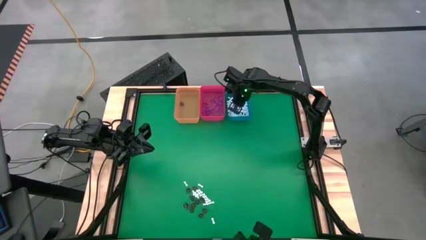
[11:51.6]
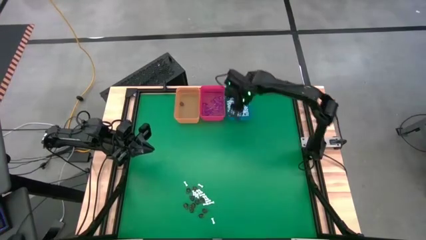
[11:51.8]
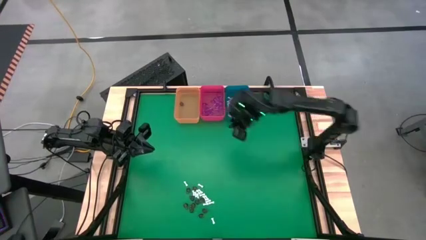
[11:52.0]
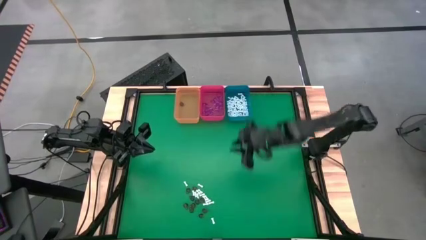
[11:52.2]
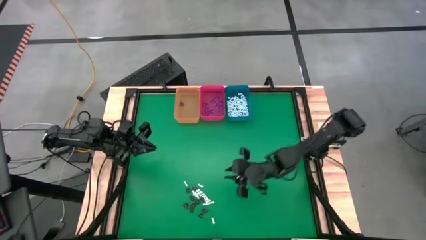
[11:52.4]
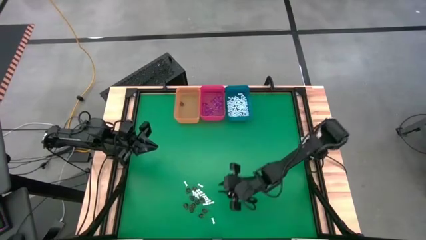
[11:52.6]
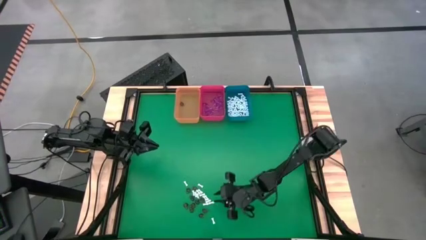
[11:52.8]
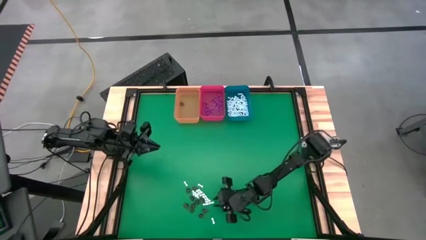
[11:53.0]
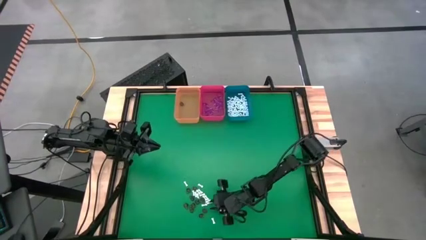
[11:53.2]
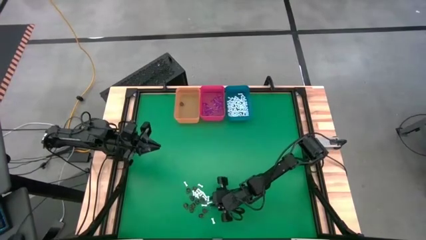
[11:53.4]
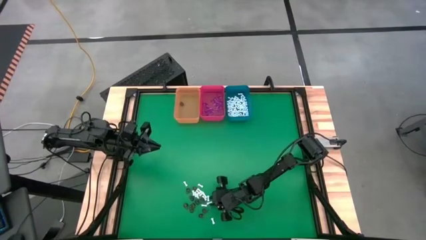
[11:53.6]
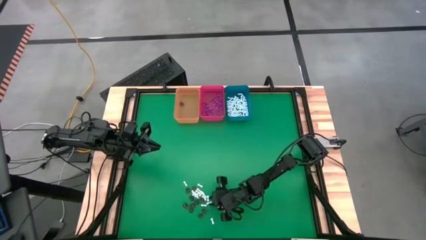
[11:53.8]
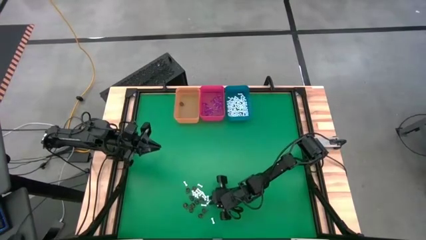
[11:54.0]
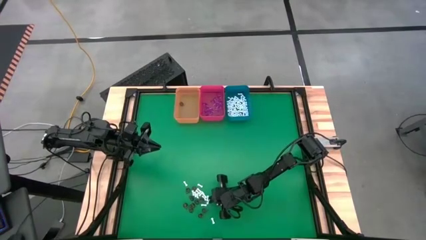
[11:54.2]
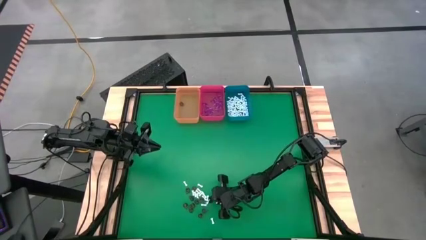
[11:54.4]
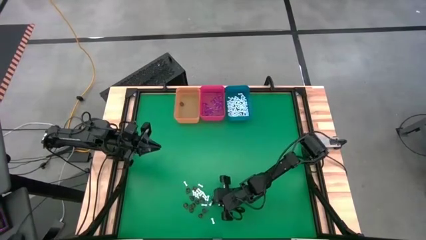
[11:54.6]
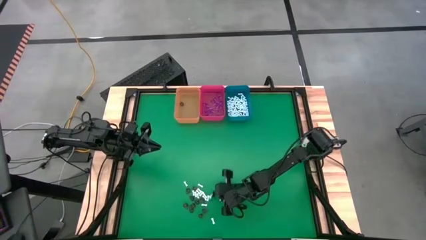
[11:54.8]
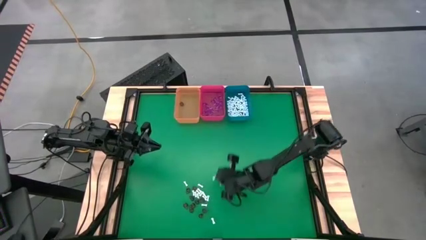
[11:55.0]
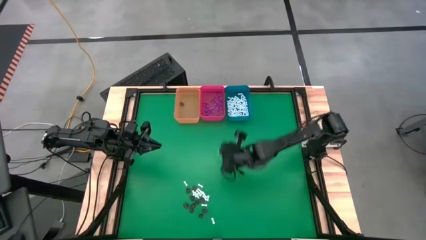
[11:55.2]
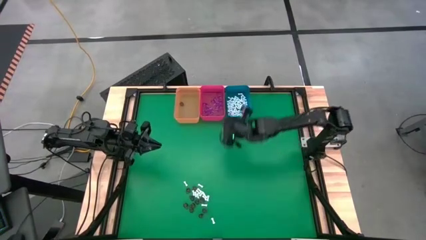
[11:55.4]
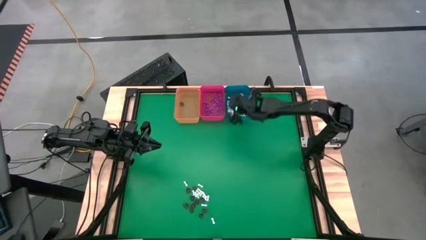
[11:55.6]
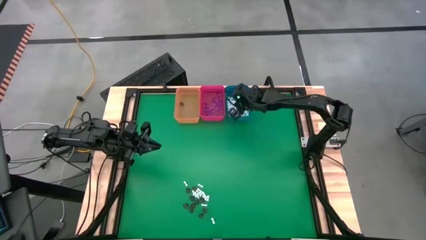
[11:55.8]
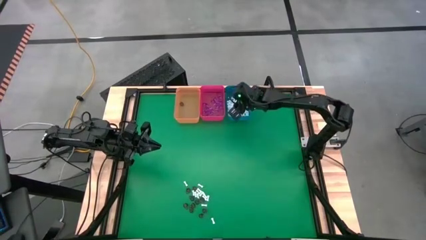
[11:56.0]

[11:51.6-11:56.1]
Task: Sort Halloween decoration
Put the white bone toy into the blue bin

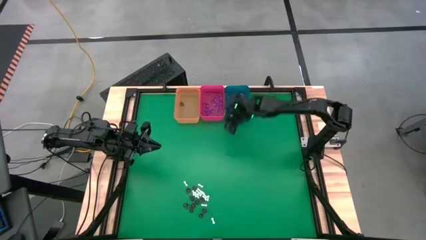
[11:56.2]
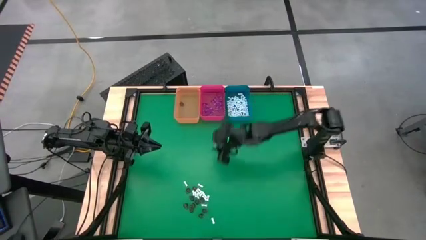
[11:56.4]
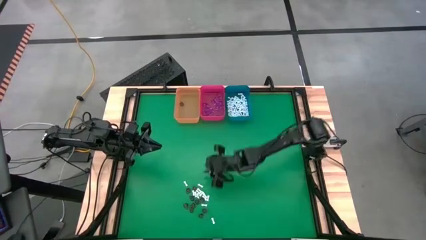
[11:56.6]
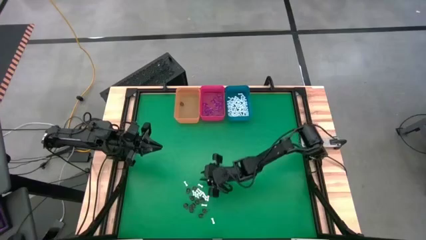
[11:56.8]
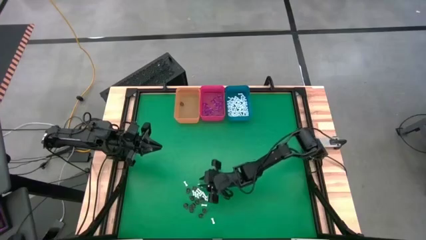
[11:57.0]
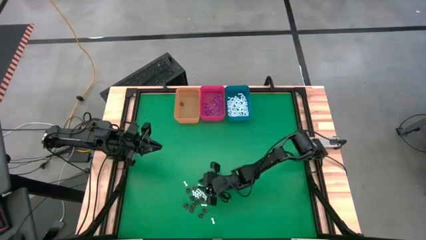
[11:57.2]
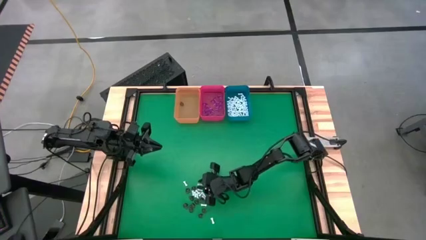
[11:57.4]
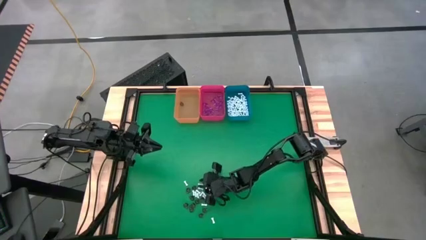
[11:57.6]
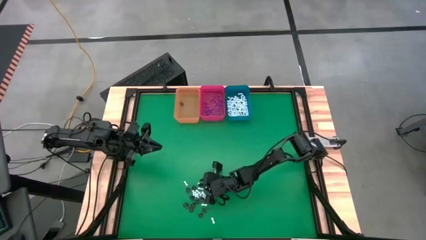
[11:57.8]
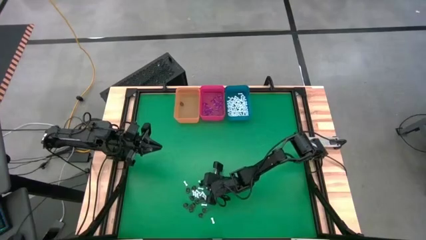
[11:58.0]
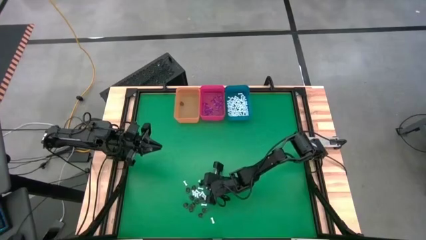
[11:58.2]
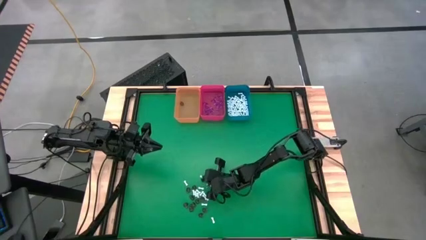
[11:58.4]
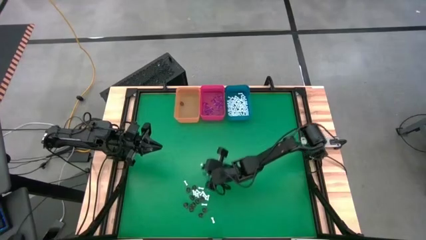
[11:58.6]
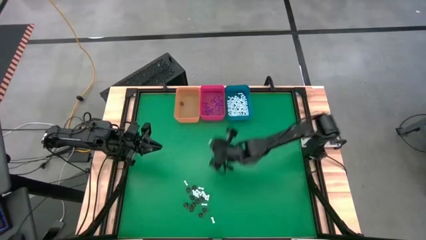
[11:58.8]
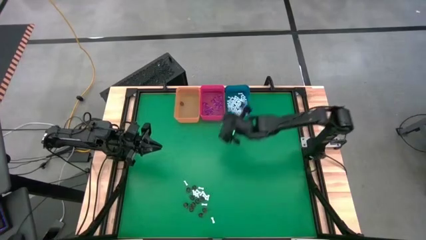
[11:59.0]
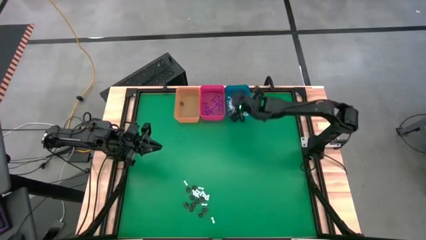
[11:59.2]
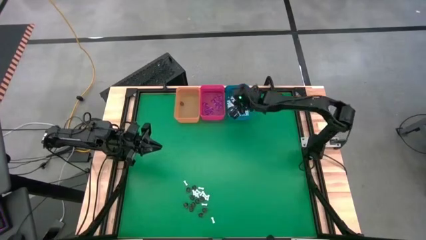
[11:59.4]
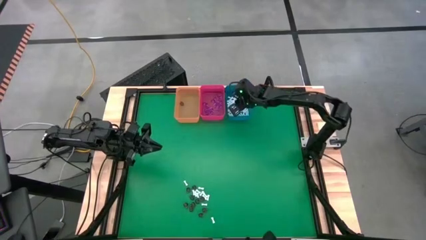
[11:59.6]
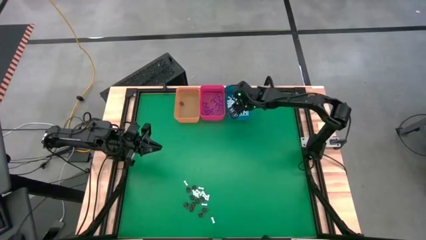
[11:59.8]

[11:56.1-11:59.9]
Put the white bone toy into the blue bin

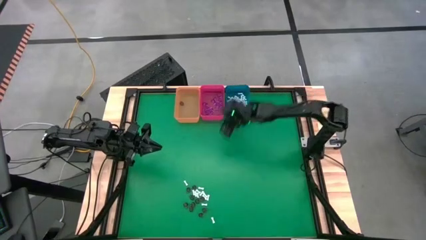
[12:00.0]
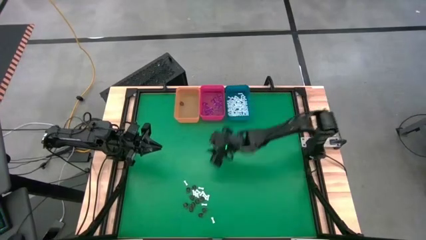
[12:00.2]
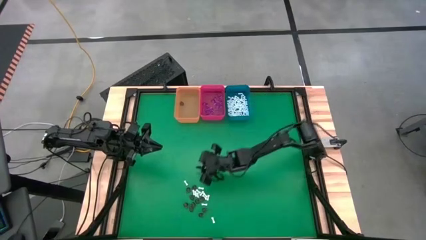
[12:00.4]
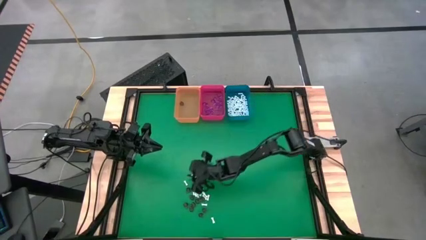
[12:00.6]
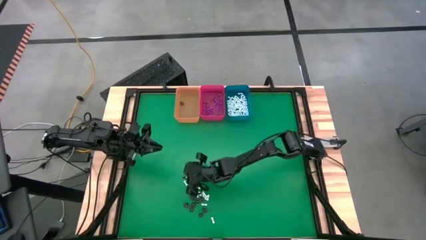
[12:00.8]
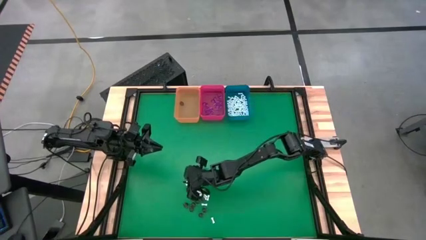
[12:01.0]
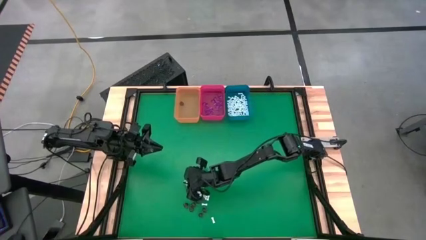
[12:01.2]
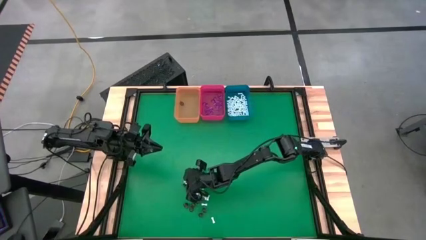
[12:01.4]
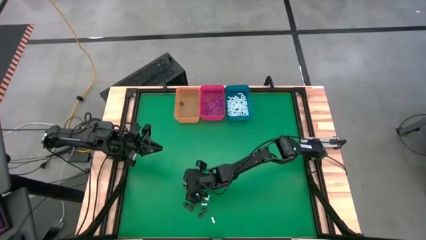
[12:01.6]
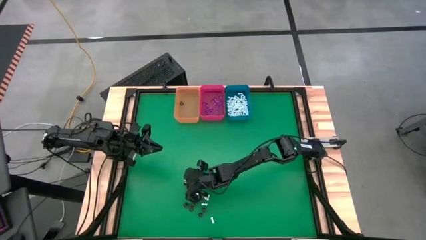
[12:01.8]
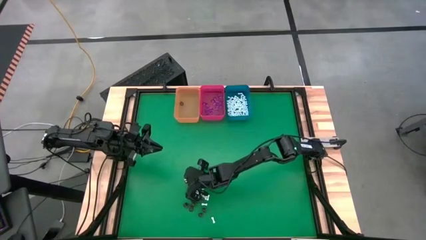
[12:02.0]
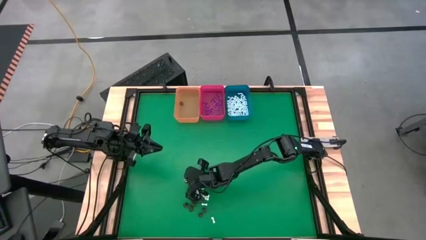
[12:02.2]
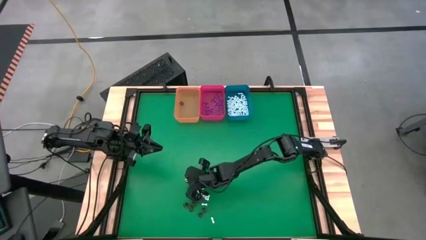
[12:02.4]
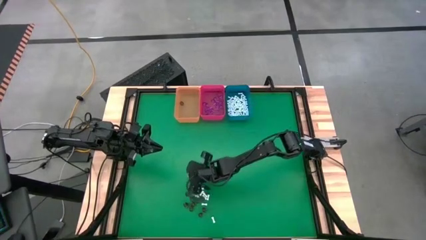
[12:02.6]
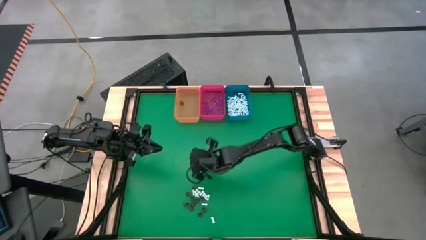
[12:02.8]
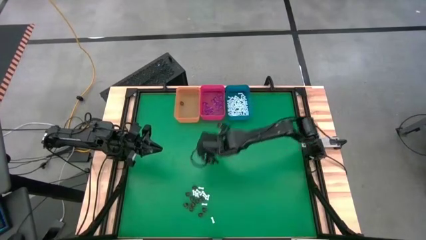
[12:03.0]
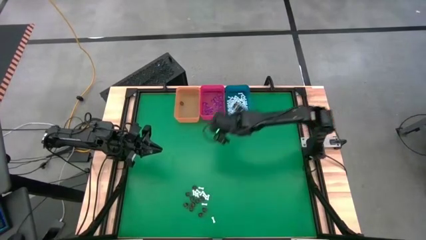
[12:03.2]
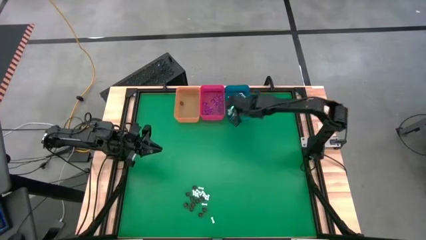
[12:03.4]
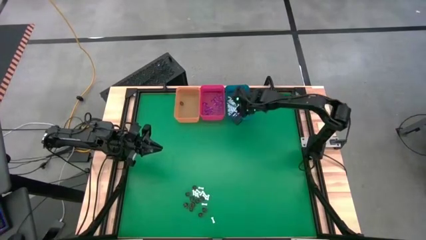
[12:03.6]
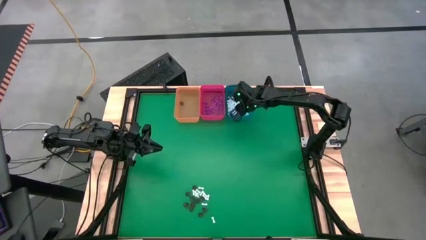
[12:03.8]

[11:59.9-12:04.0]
Put the white bone toy into the blue bin

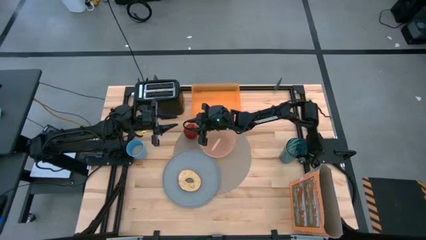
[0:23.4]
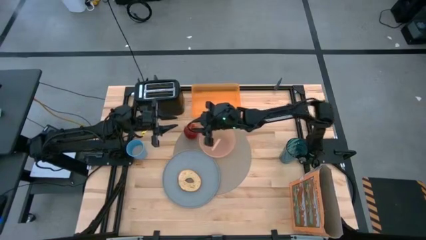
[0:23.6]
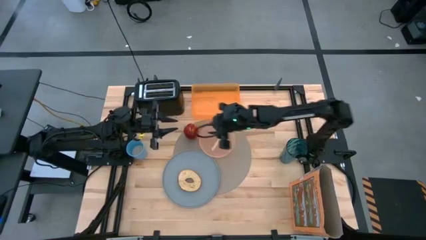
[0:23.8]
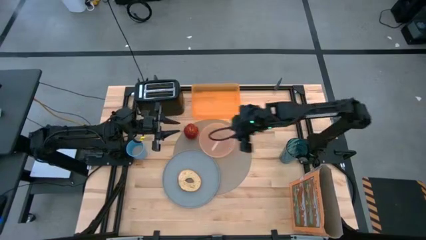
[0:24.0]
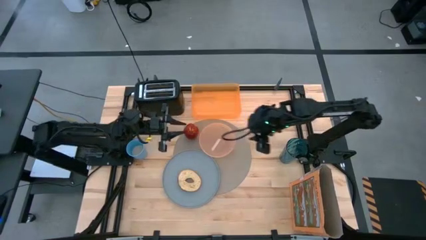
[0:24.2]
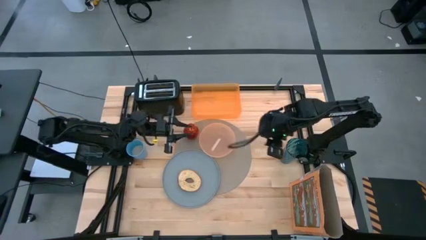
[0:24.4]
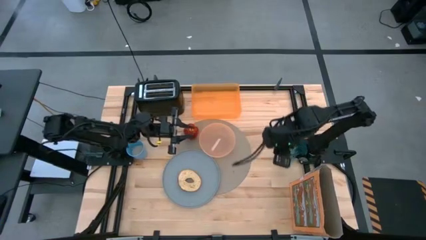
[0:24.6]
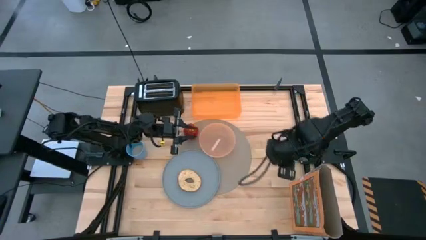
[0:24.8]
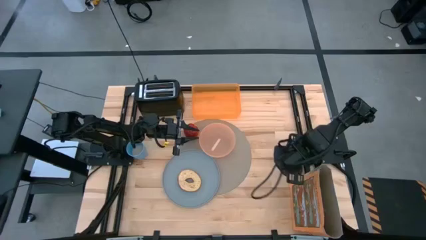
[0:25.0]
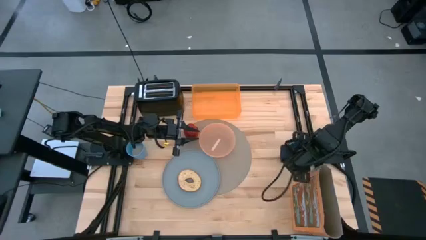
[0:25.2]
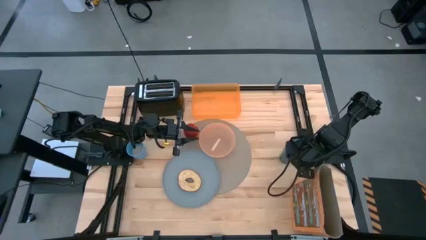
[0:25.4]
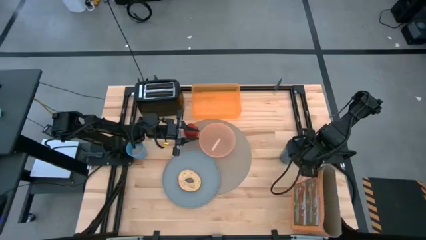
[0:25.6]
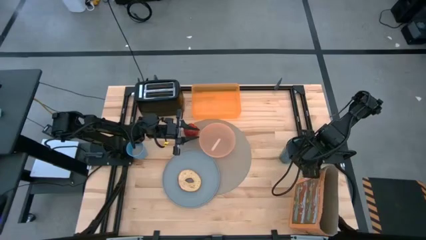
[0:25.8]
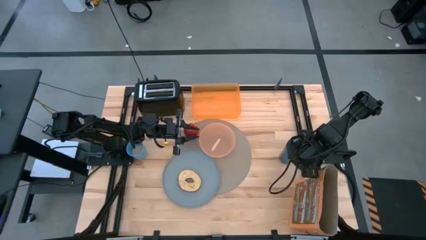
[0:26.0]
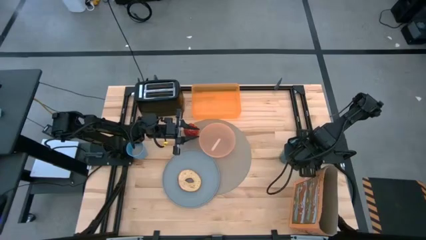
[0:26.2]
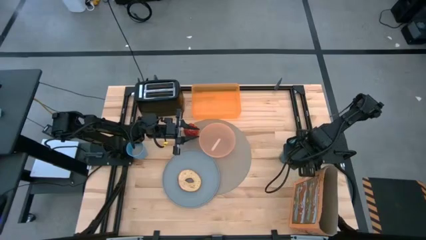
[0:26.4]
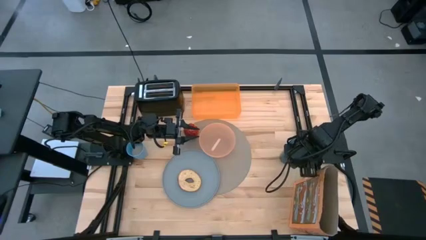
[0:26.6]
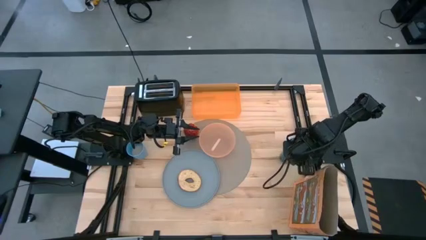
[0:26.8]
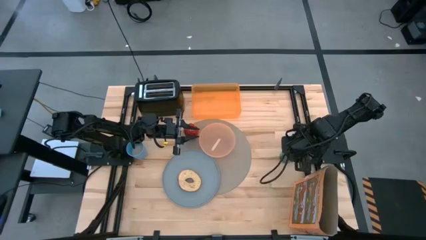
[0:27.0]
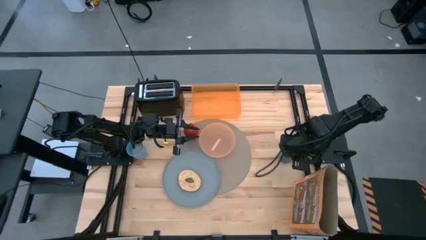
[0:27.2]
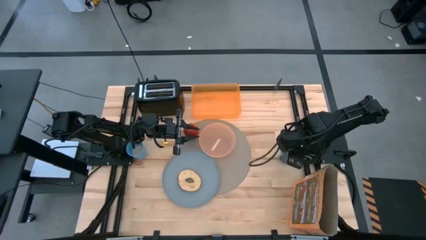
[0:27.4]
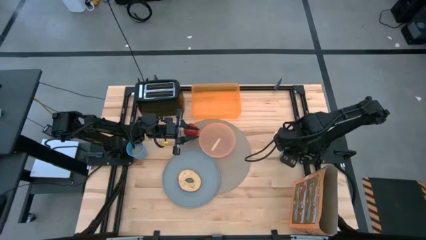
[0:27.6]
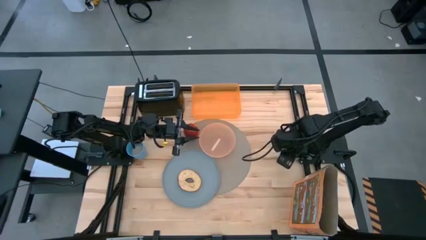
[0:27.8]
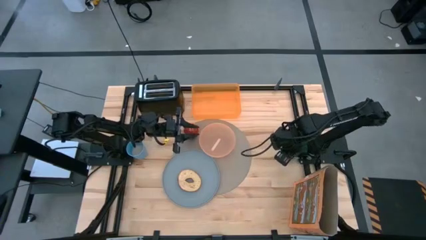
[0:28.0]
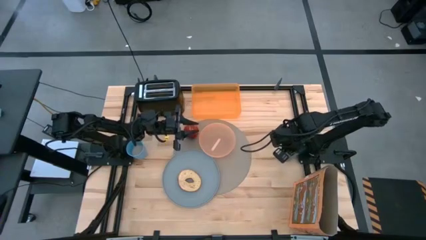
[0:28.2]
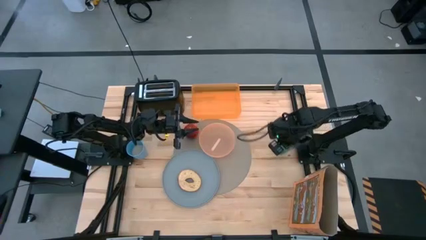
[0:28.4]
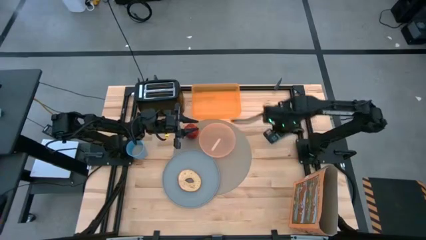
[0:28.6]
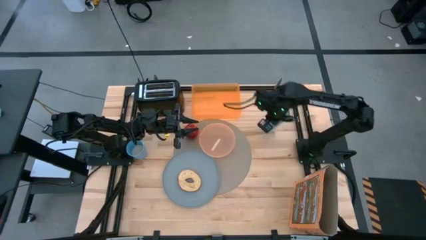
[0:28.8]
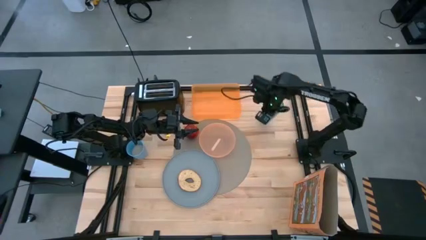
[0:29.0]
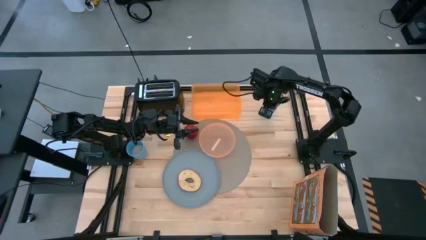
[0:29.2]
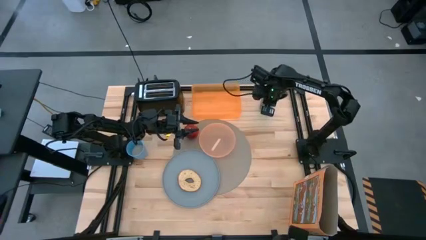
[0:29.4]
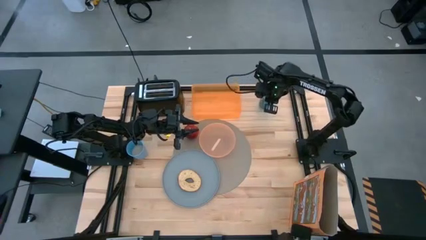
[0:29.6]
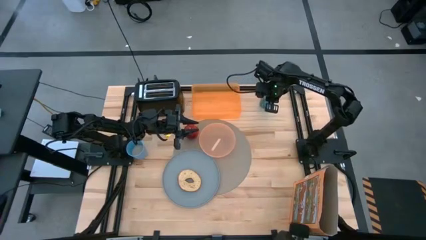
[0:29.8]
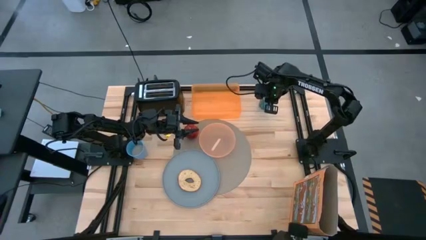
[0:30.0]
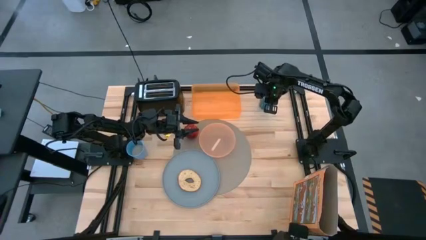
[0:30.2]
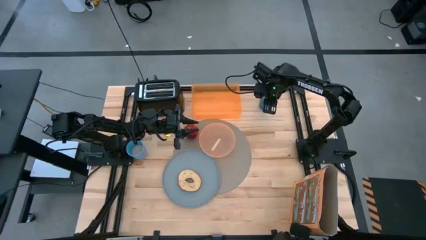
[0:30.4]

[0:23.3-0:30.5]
Task: Arrange a breakfast setting
Move the dark blue cup to the top right of the table
